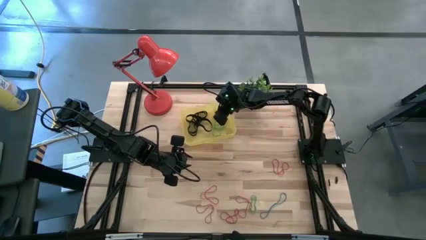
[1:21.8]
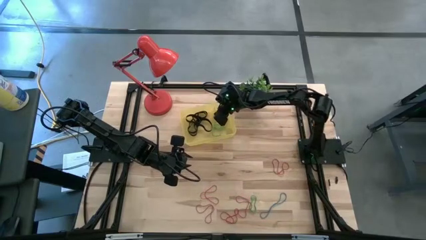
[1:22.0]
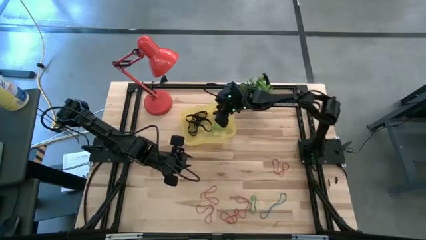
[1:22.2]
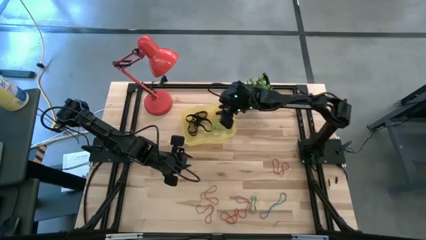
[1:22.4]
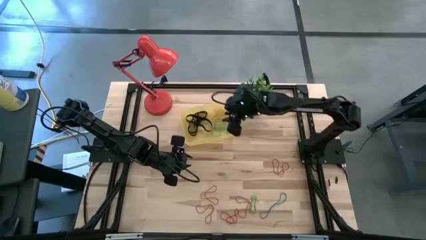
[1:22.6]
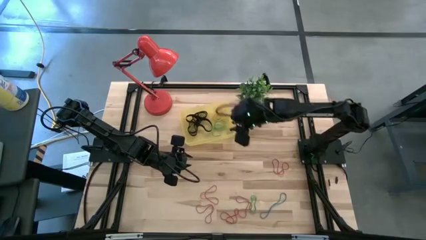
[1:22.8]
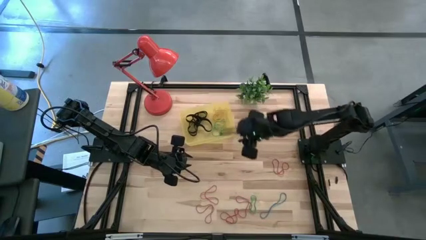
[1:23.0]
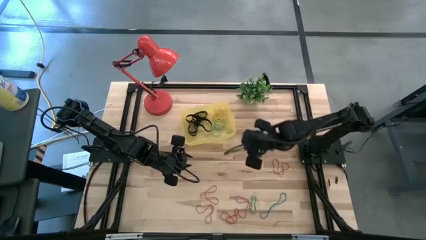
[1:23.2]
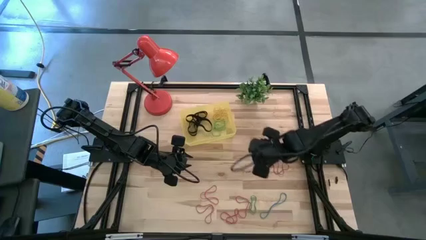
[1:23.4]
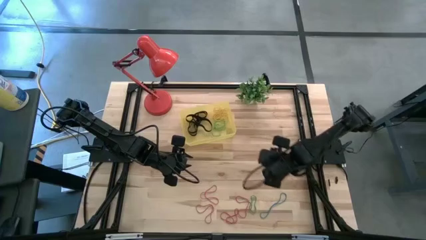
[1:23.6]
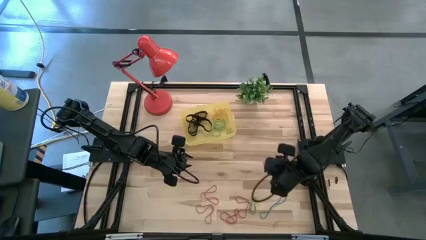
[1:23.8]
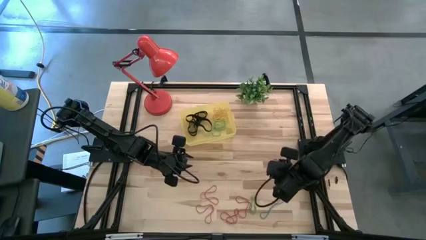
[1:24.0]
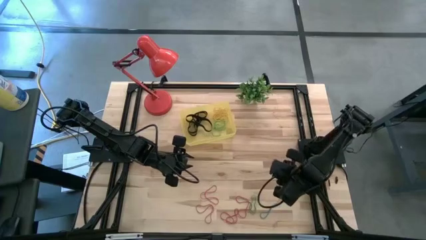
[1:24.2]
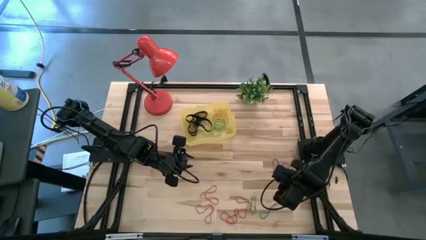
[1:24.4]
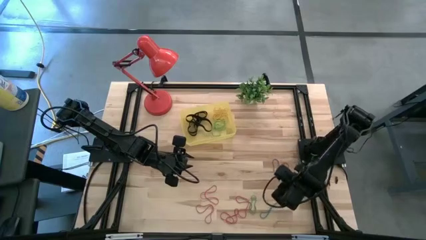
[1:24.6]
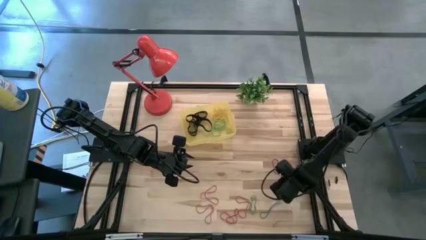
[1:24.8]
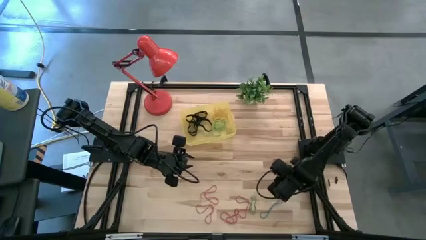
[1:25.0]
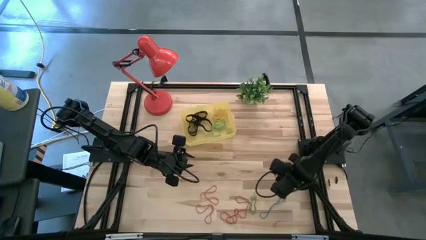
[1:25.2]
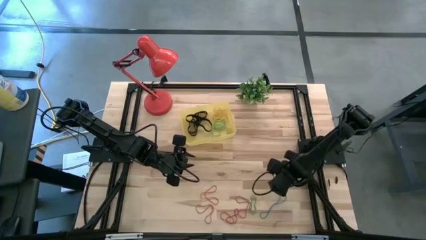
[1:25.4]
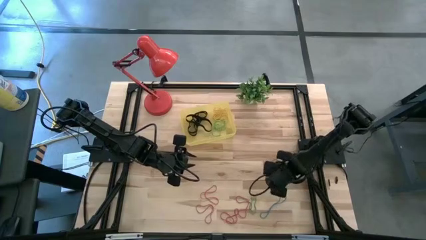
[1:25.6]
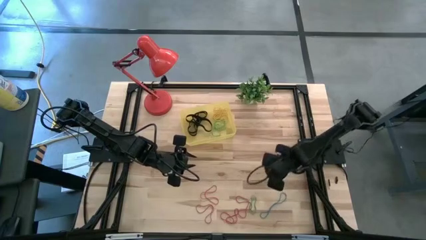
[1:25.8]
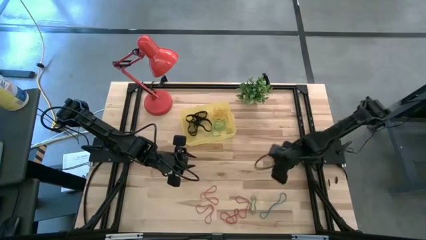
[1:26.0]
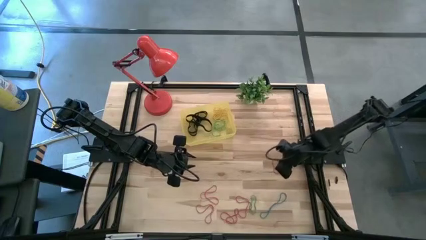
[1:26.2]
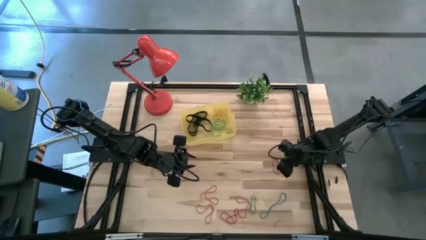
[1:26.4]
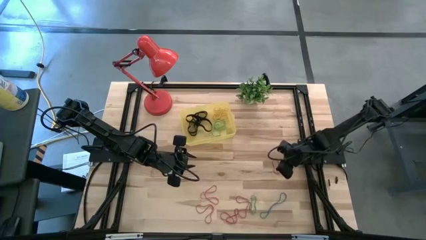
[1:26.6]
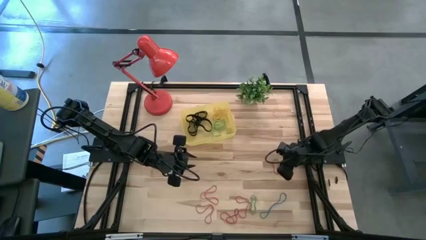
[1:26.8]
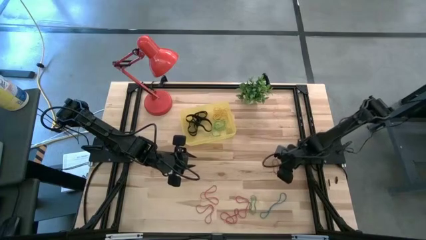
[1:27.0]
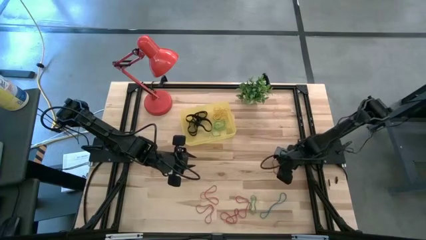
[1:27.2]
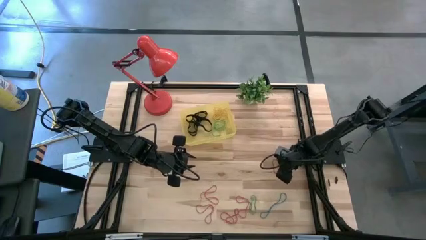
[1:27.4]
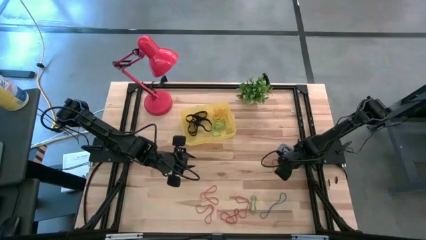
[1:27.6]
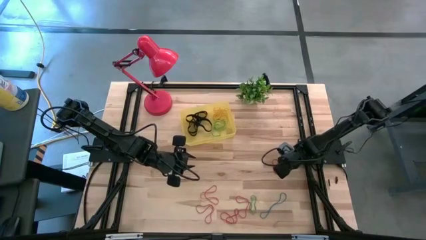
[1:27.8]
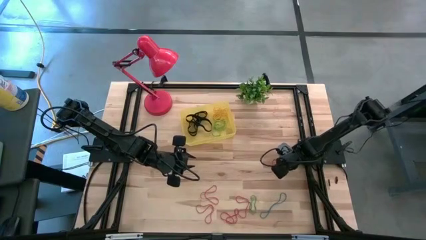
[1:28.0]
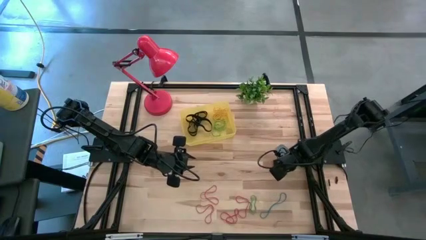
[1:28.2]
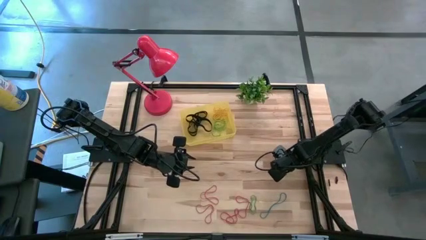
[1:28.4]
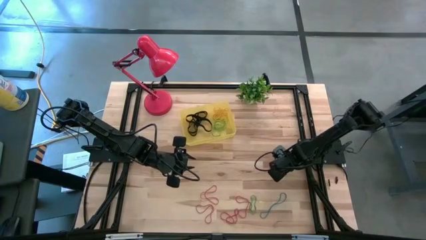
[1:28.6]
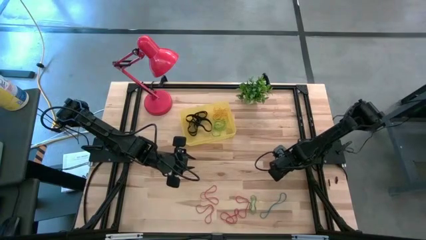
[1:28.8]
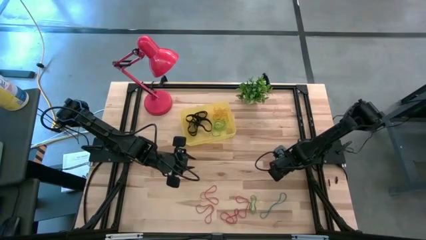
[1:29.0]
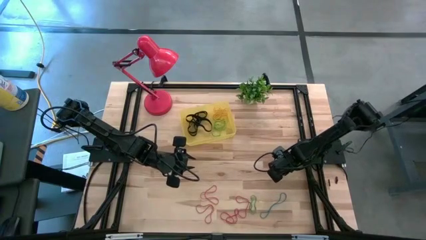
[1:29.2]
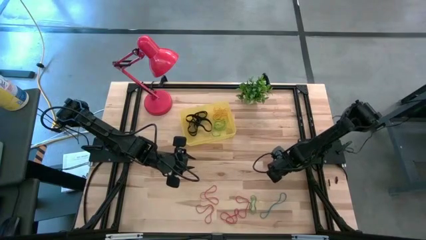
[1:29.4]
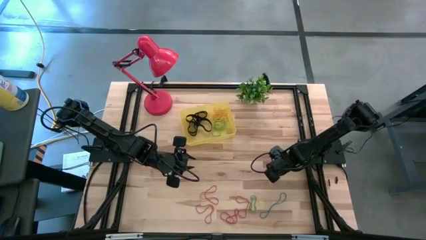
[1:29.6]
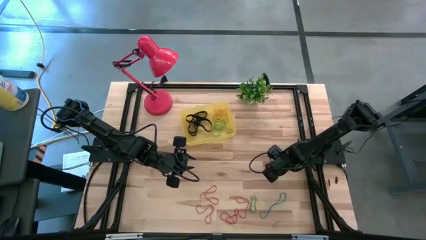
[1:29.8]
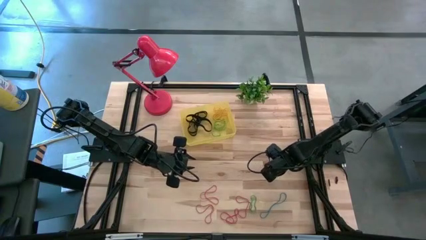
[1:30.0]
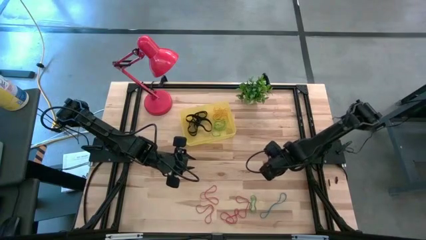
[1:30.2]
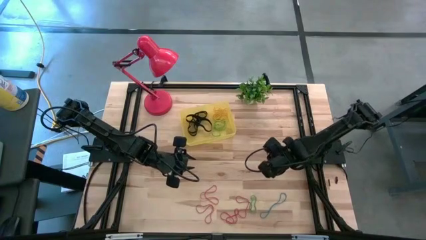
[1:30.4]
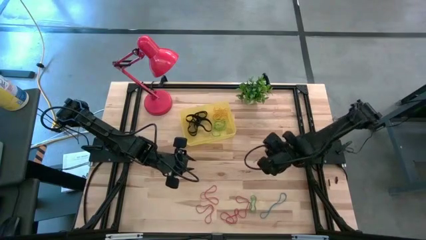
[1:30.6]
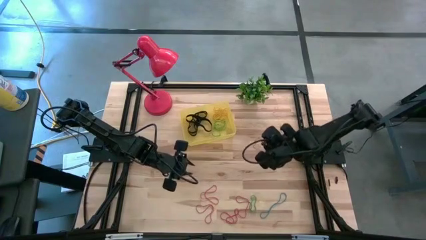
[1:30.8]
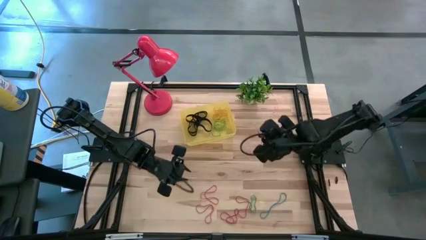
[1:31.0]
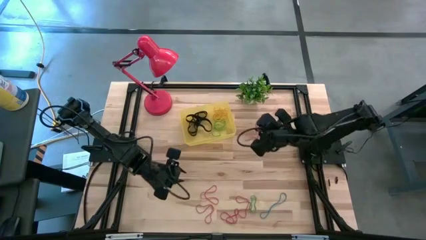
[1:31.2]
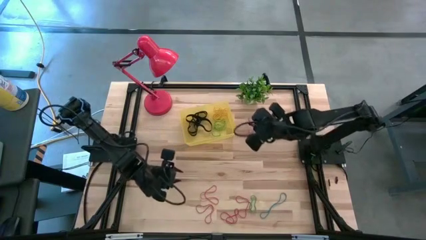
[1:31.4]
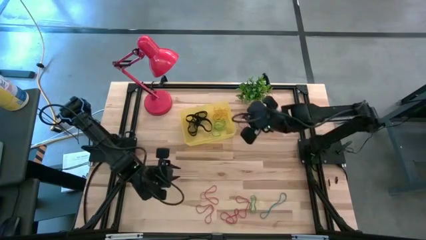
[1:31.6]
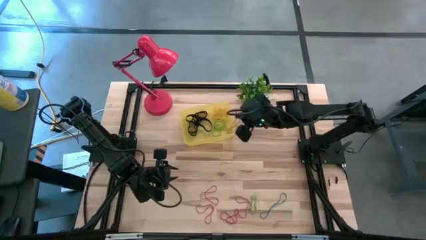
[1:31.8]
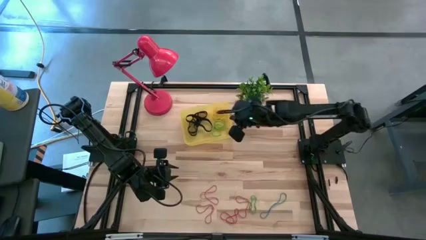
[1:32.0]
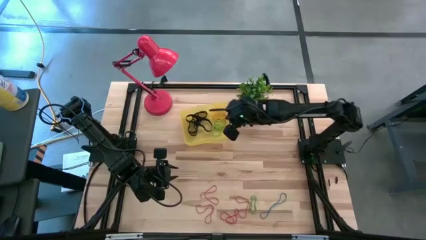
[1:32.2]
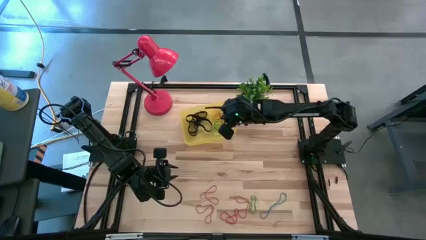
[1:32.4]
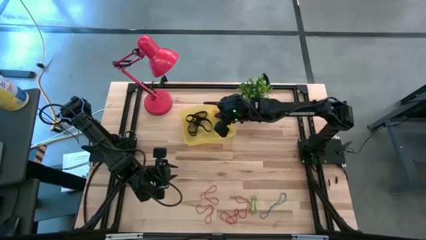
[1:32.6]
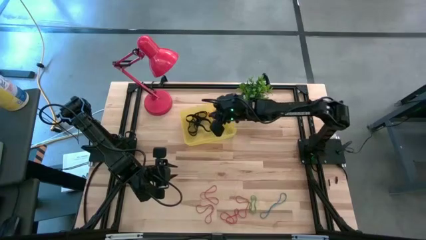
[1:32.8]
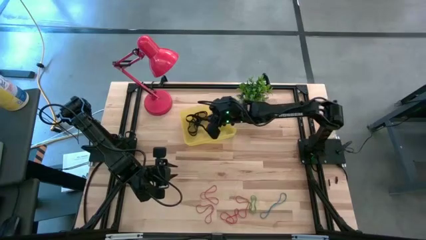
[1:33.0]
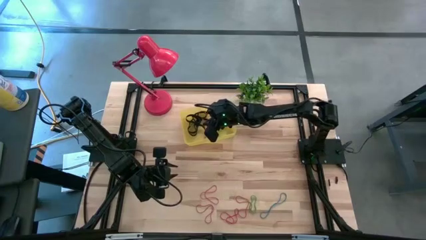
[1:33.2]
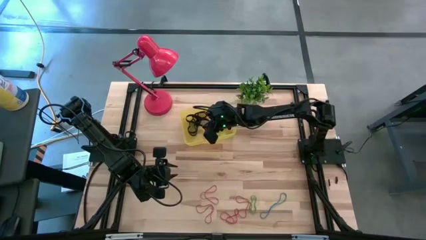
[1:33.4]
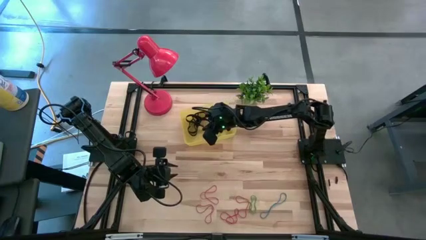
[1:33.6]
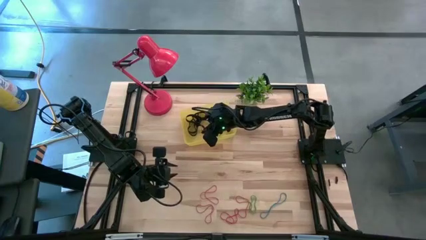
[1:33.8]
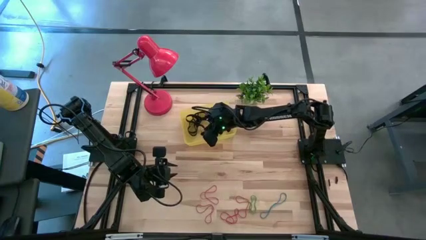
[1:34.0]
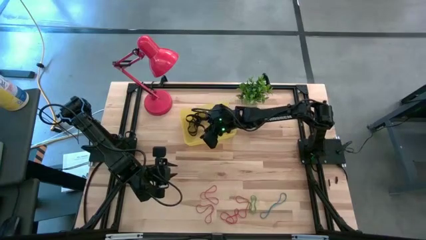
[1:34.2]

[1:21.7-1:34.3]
Task: Pick and place rubber bands into bin
Put the red rubber band into the yellow bin

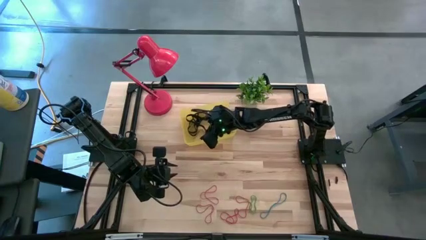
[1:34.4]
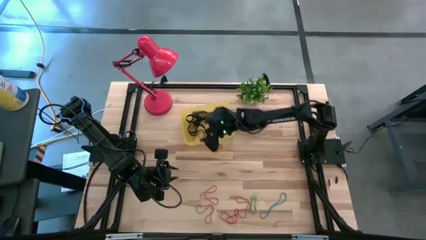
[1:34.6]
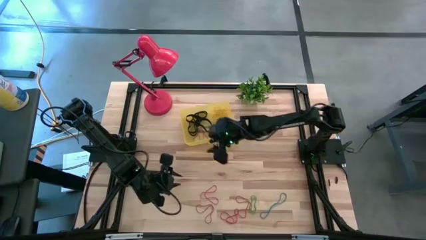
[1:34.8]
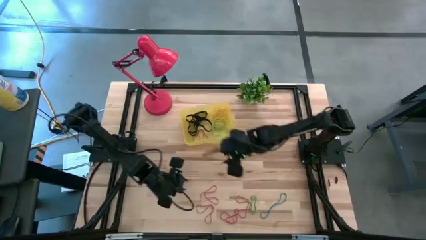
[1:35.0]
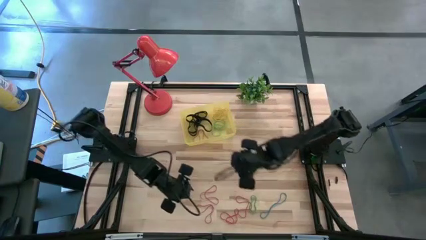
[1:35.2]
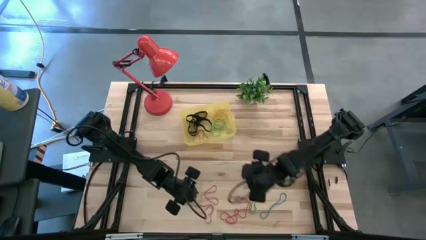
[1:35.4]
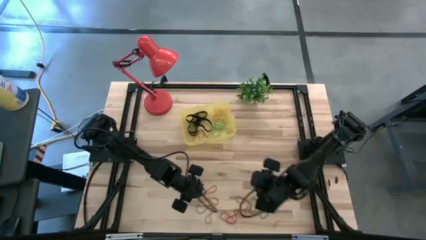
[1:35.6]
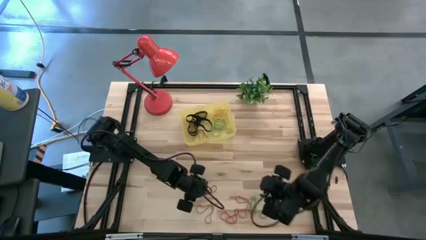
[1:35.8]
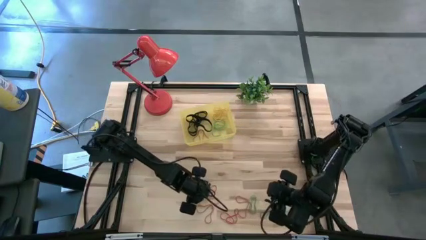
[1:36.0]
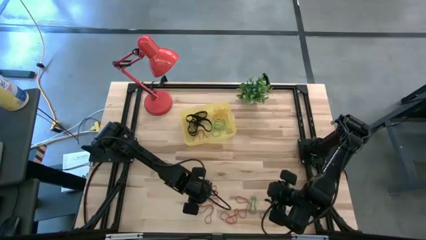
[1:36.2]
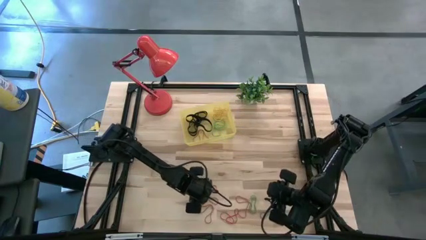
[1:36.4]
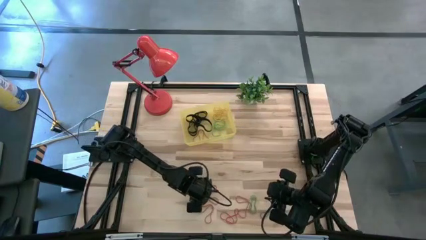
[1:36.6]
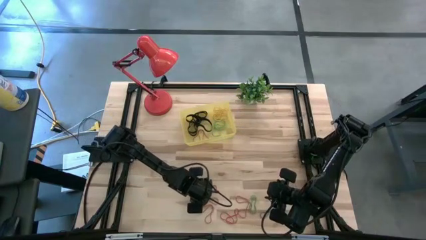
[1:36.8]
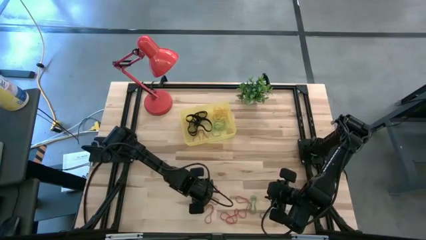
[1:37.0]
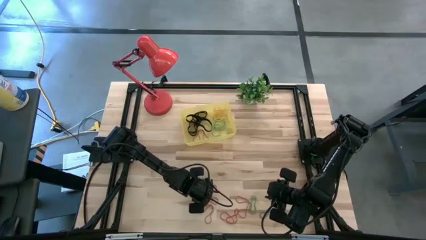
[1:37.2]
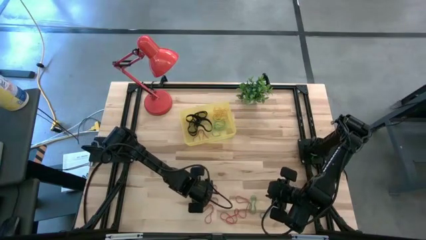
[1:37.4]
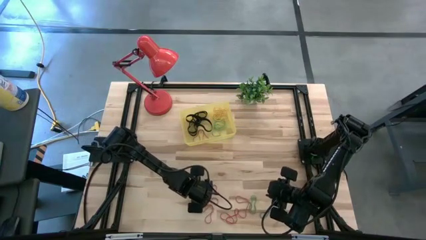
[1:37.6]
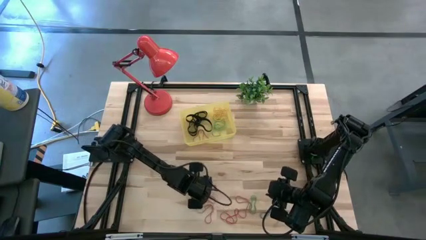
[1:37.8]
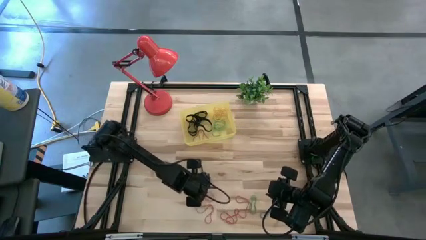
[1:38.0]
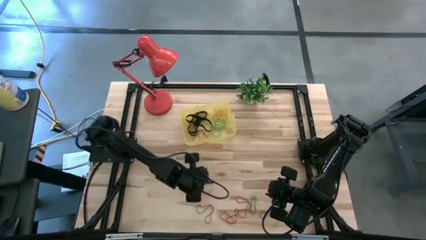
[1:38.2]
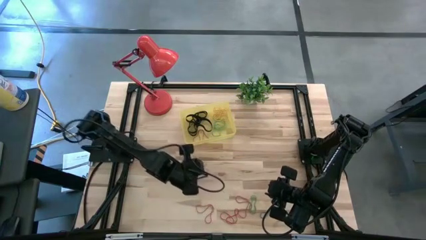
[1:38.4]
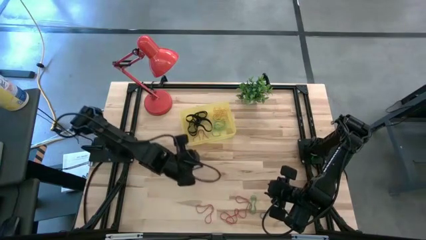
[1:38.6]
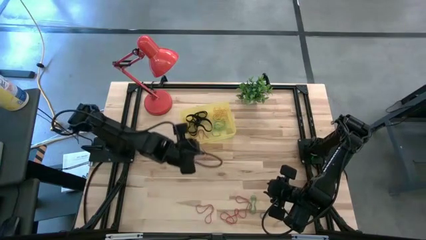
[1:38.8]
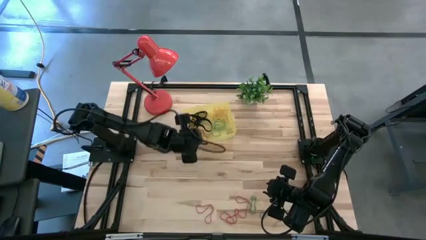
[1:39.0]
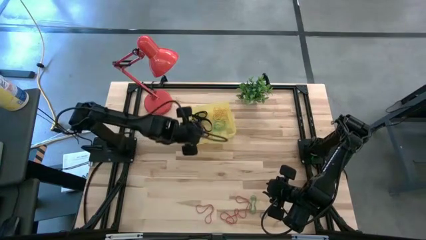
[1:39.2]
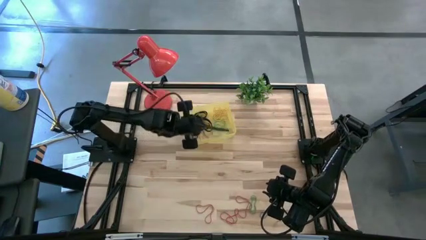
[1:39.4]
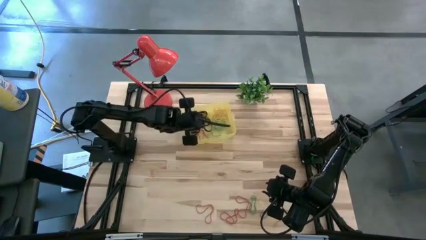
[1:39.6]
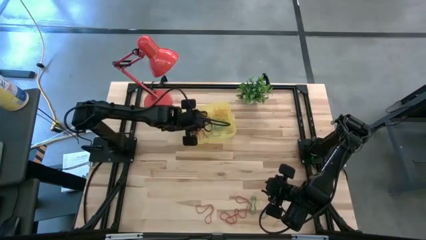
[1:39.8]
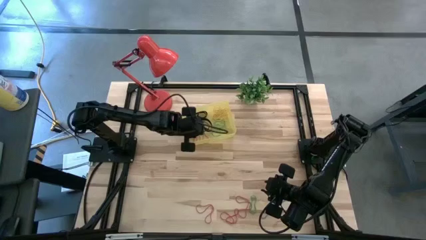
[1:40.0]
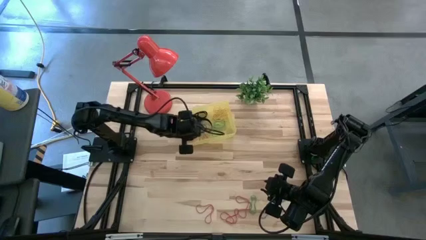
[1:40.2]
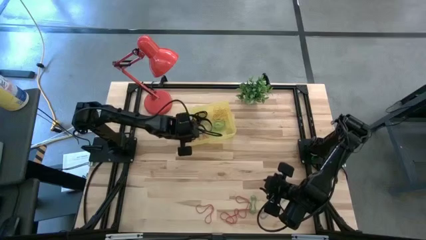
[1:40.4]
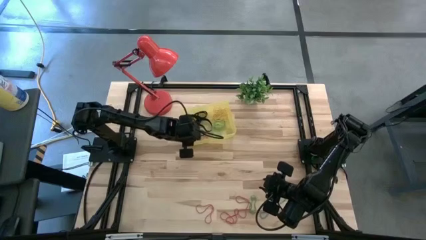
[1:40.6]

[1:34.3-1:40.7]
Put the red rubber band into the yellow bin
